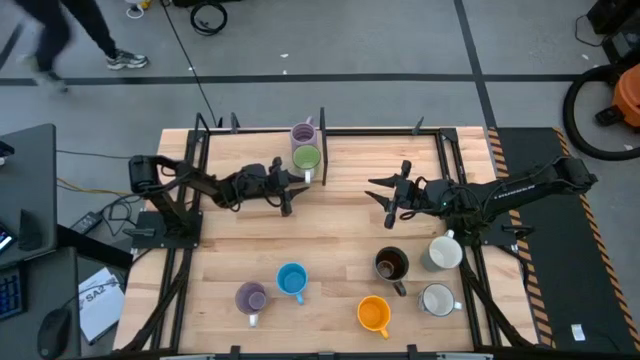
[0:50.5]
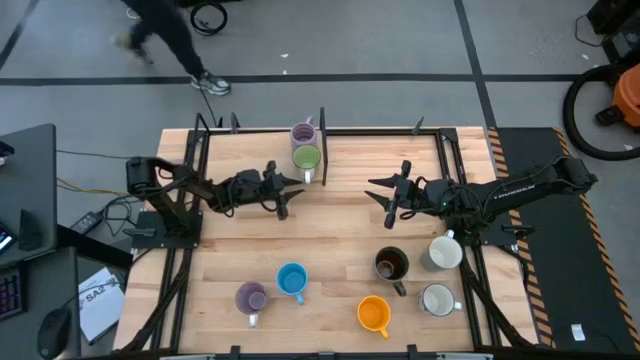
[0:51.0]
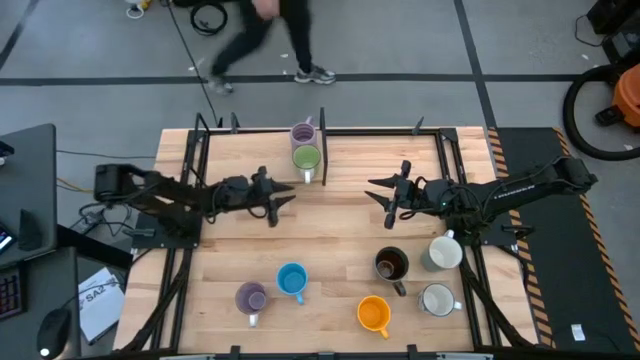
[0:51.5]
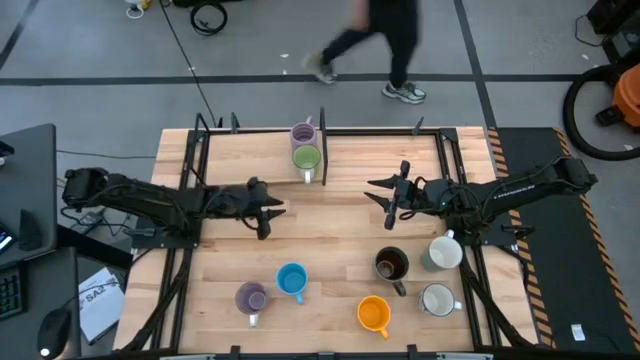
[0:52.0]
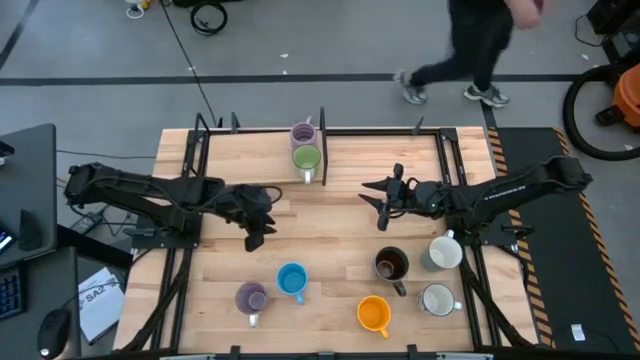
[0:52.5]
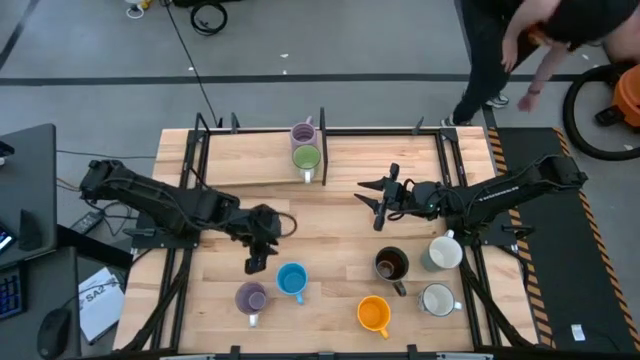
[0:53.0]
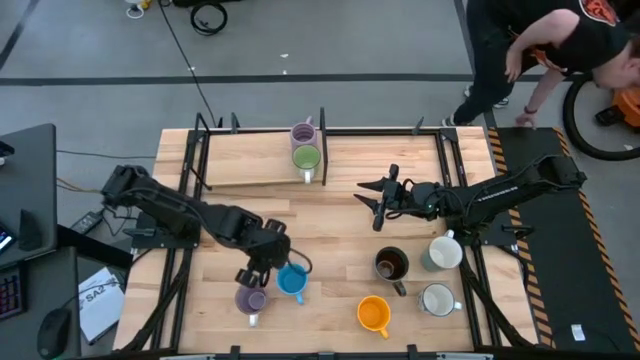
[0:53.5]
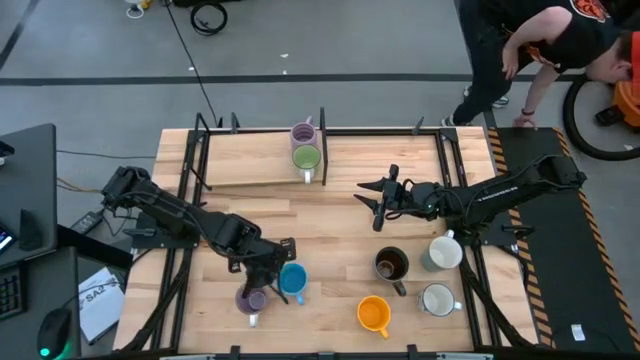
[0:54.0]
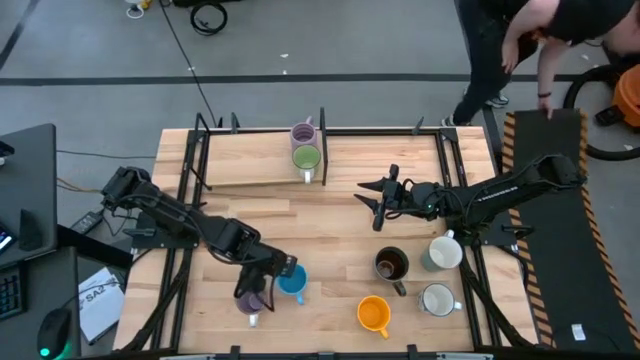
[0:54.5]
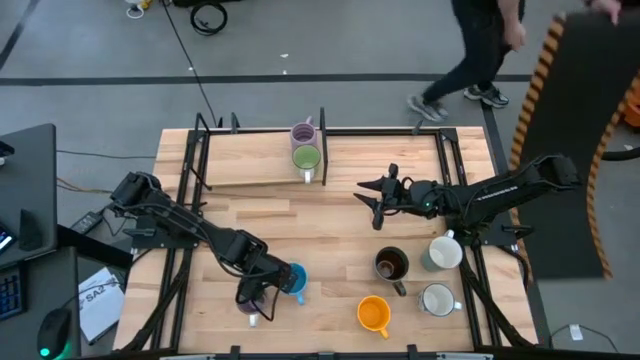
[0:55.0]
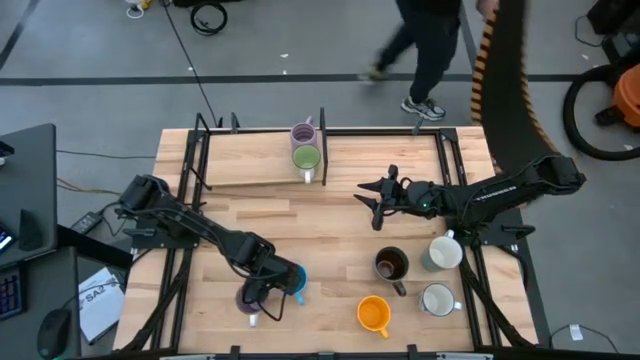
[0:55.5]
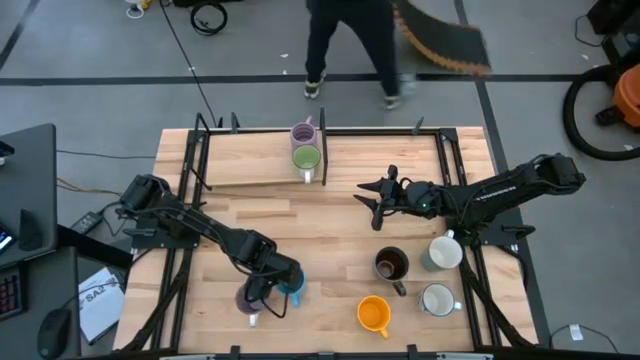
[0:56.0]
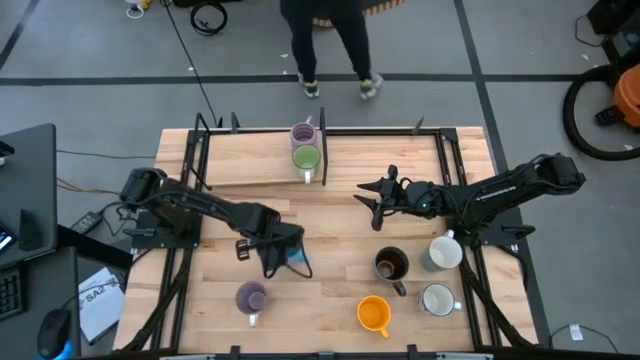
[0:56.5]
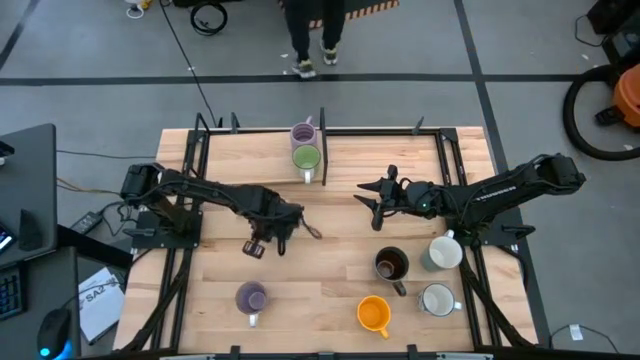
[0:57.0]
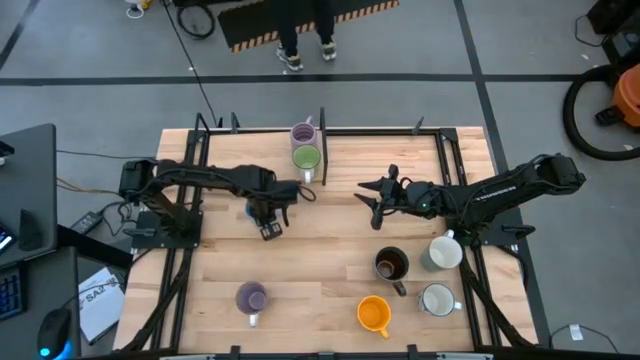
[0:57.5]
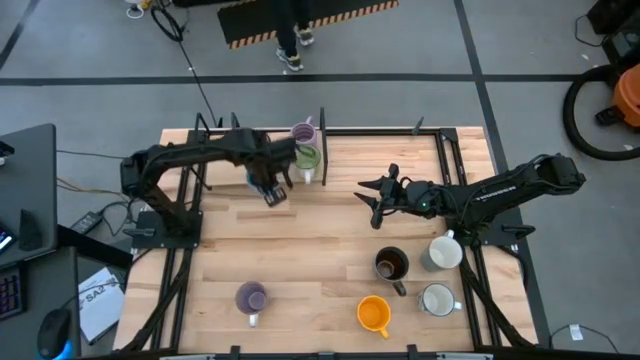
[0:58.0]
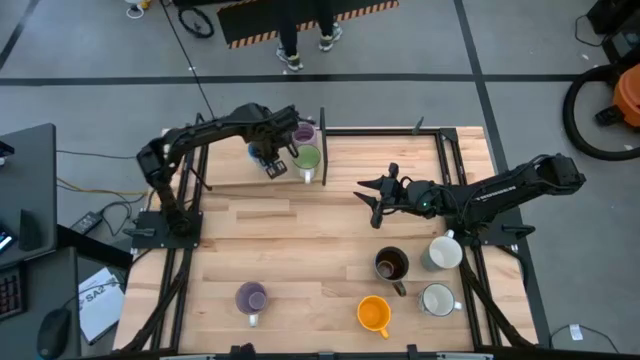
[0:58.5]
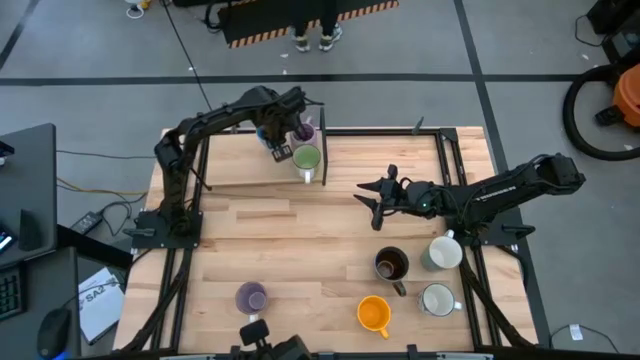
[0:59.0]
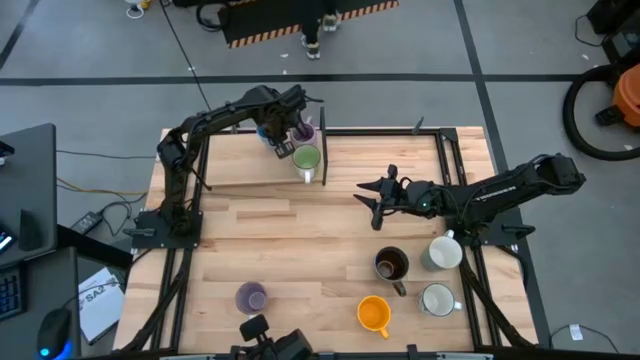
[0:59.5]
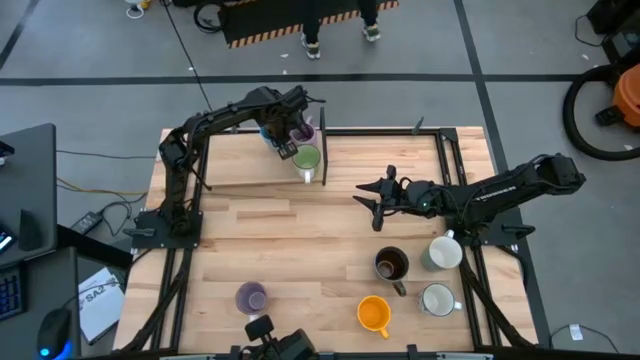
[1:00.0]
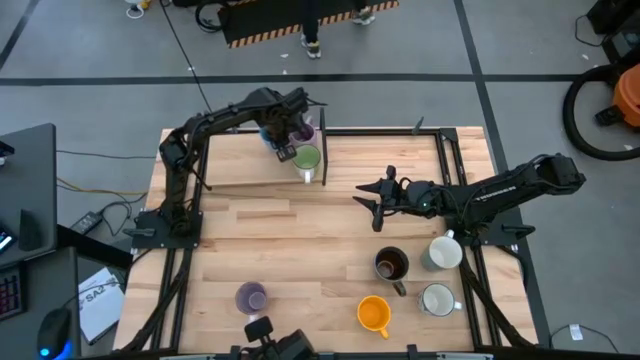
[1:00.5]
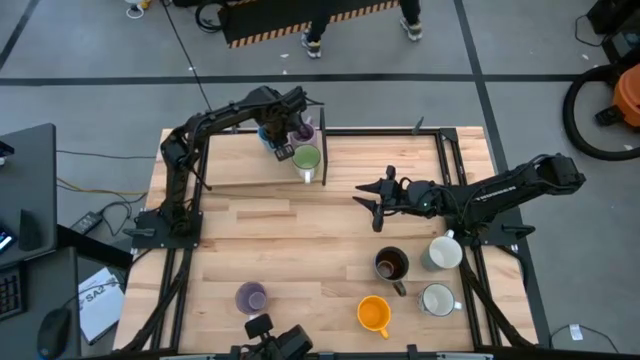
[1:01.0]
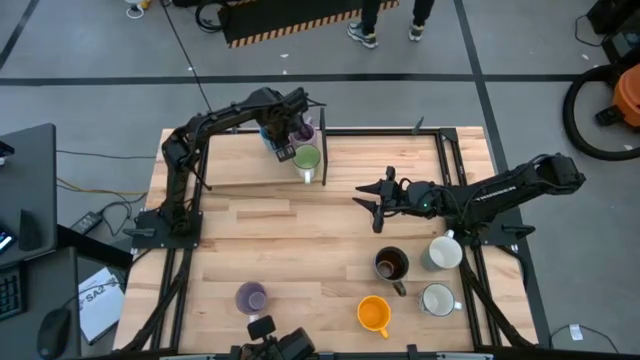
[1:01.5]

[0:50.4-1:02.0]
Task: Place coffee mugs
Put the blue mug on the shelf

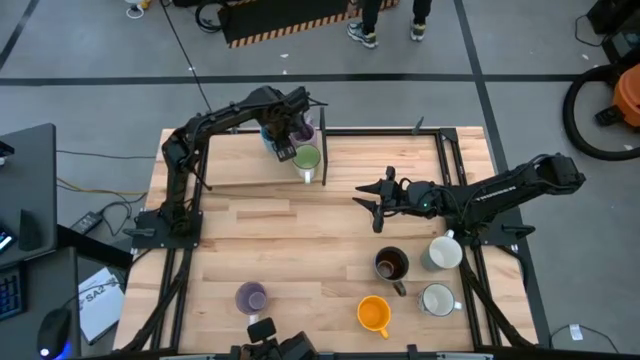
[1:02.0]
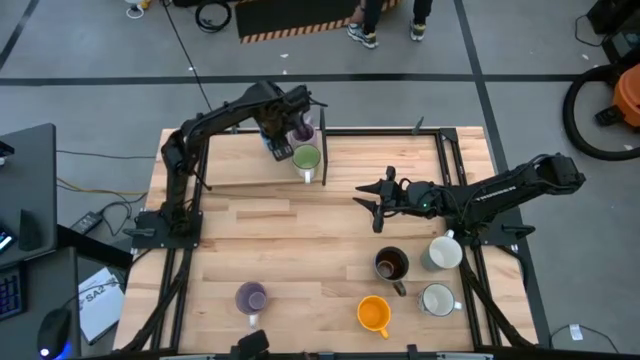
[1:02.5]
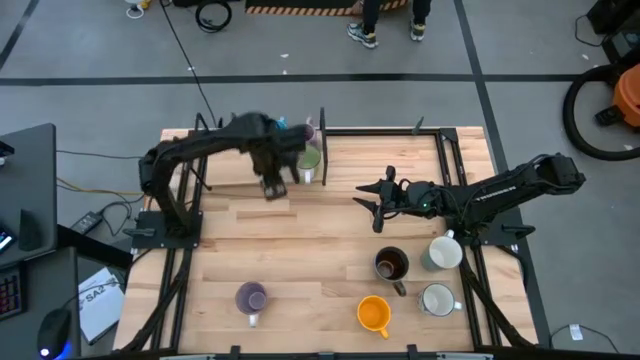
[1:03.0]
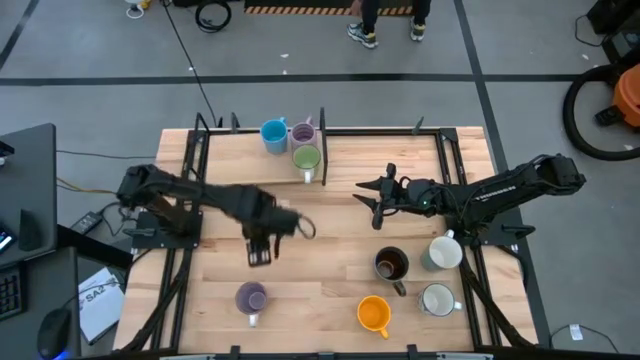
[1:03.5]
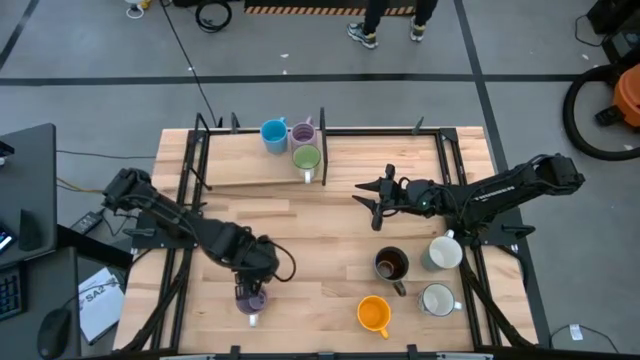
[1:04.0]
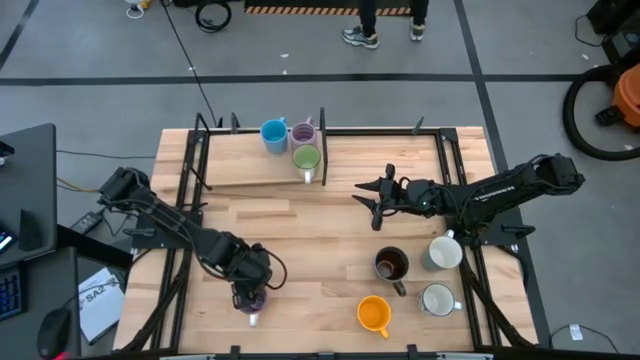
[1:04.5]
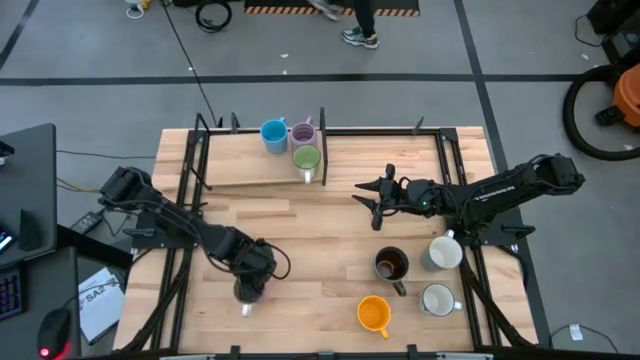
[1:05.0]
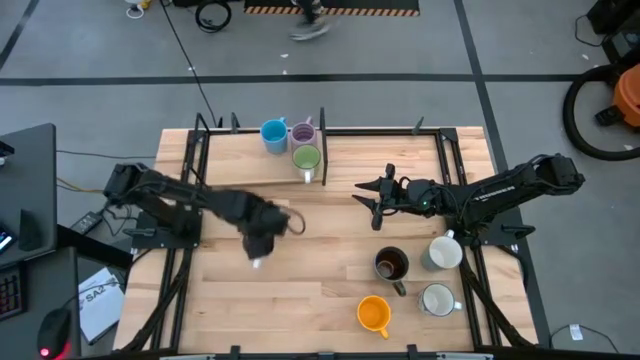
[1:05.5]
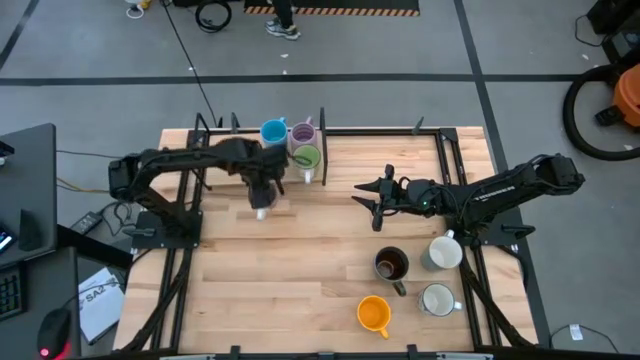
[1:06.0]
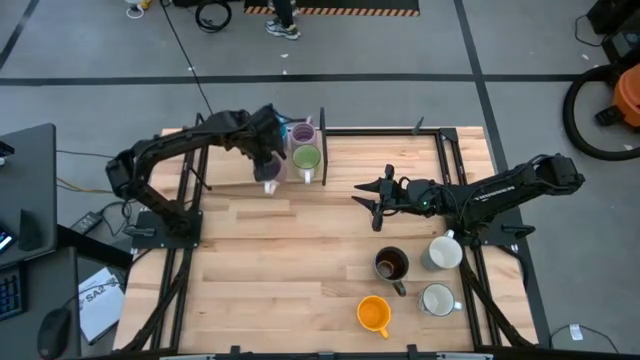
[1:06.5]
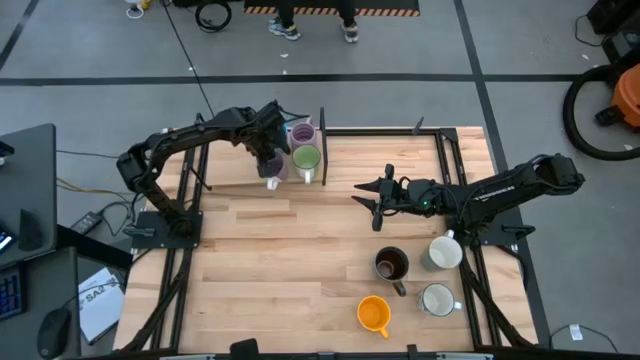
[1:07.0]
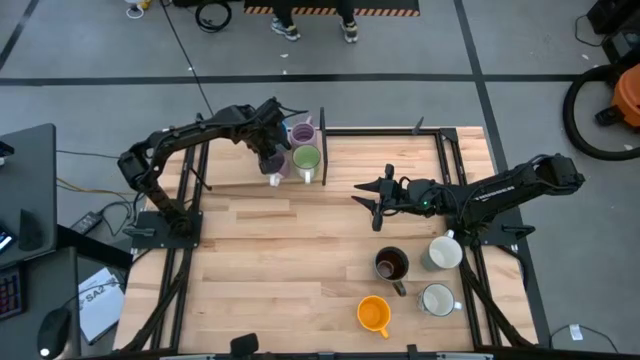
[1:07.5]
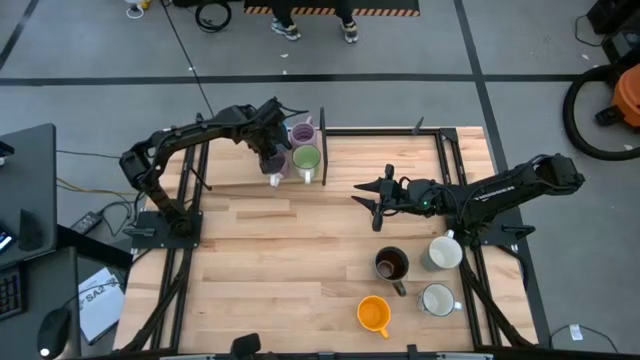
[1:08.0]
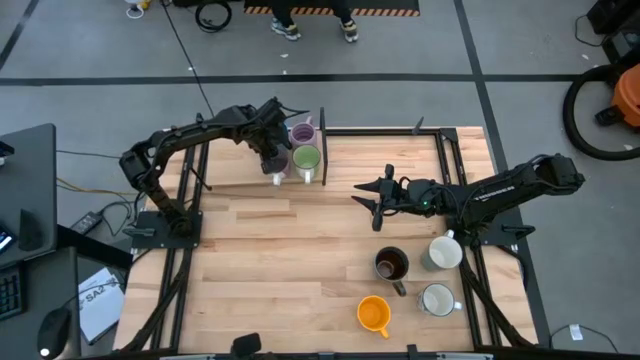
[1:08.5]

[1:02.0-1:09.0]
Put the light violet mug on the shelf

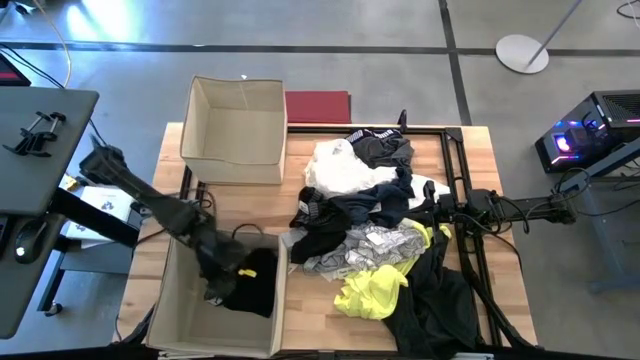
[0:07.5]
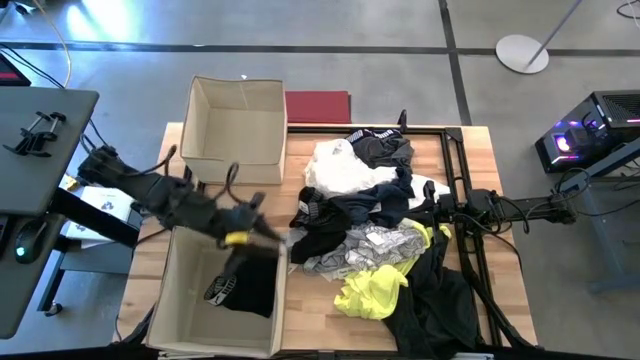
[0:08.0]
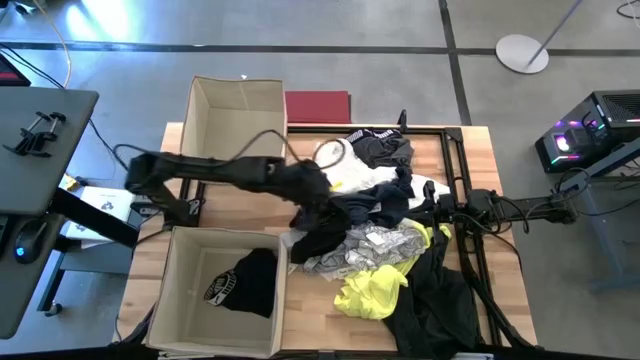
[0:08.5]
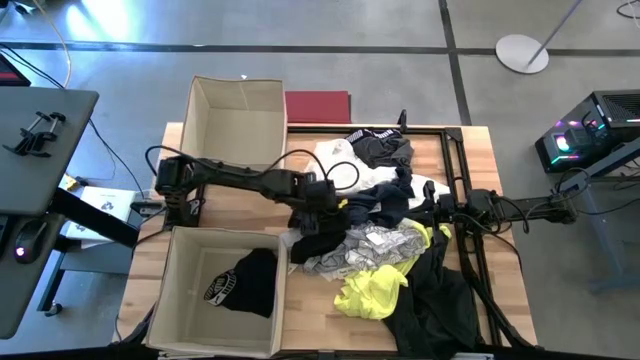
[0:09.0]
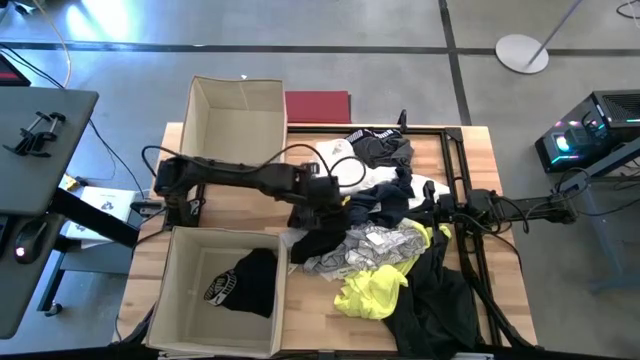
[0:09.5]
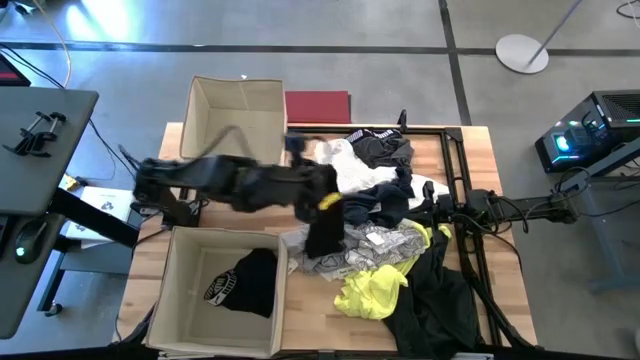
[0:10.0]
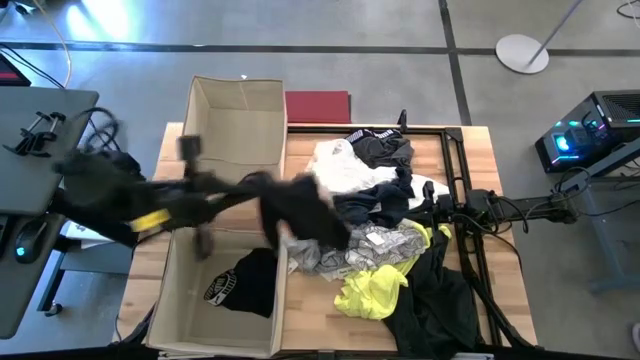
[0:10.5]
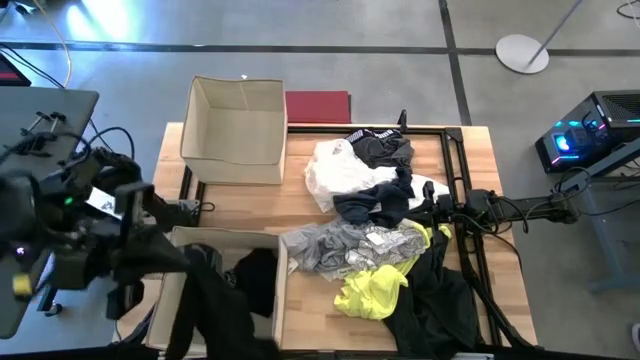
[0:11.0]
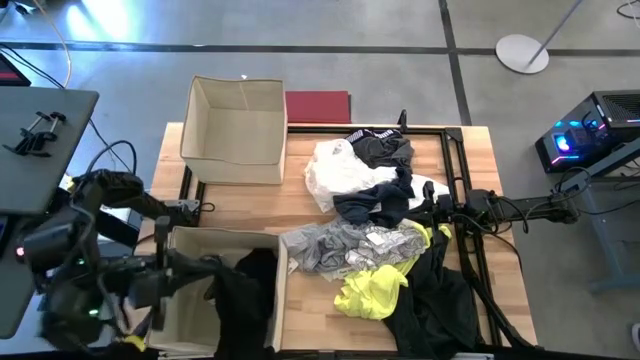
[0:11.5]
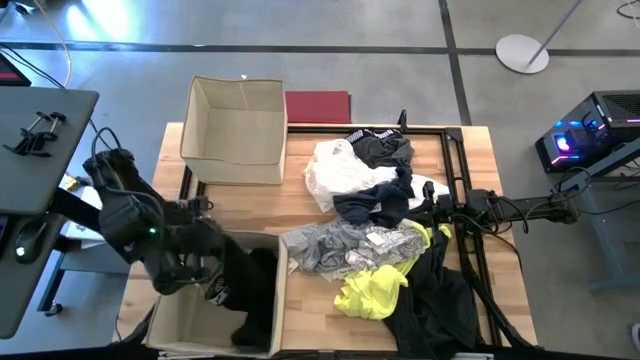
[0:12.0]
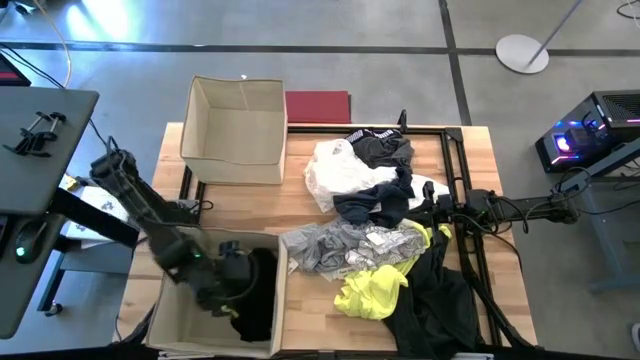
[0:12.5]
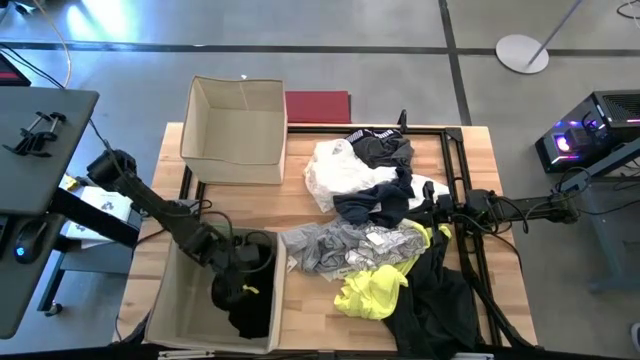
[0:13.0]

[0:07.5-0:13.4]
Task: Sort clothes
Put the black boxer into the bottom laundry organizer
